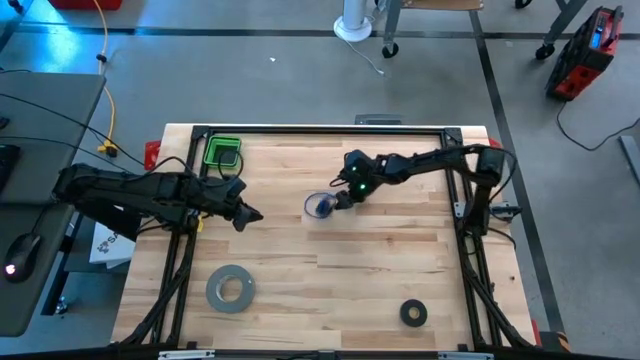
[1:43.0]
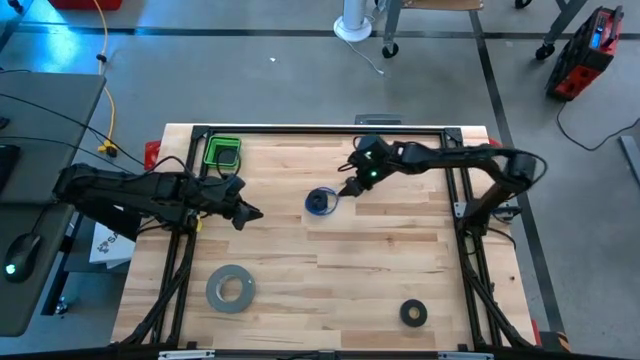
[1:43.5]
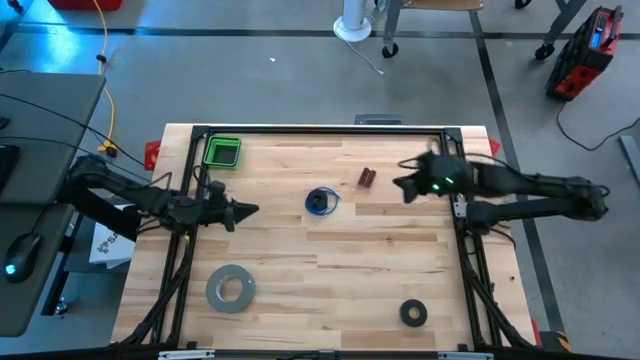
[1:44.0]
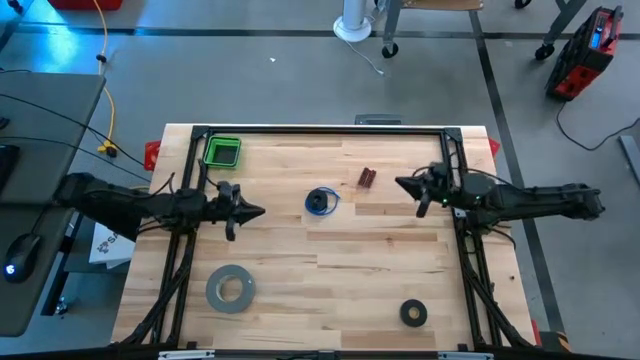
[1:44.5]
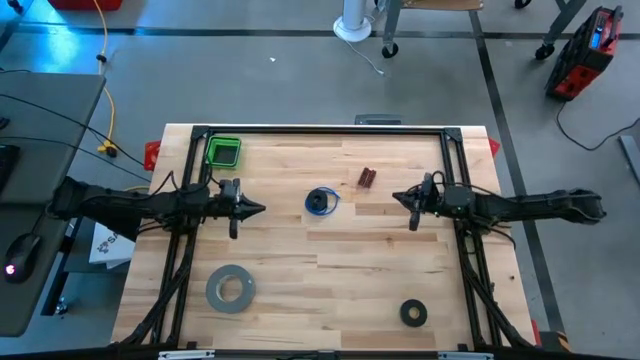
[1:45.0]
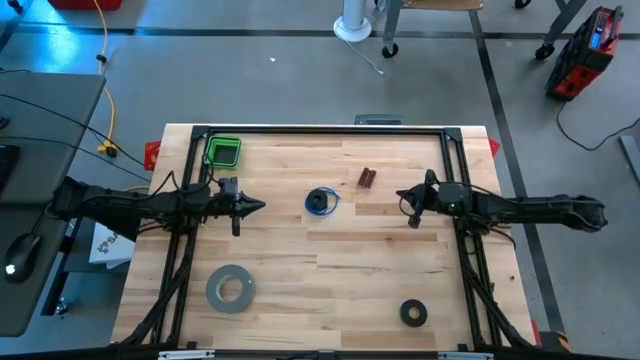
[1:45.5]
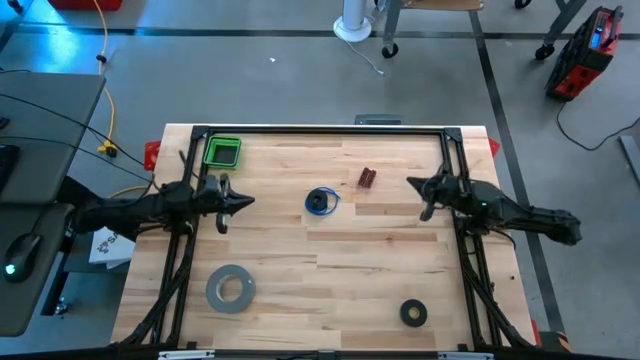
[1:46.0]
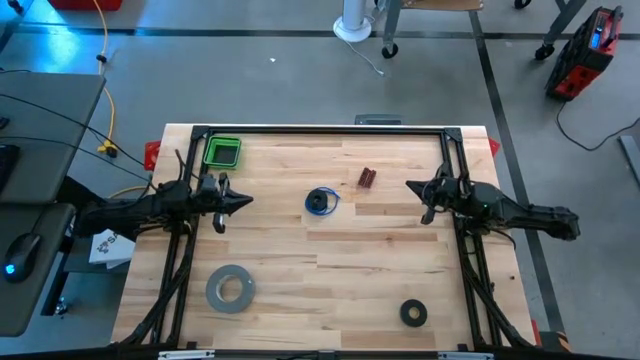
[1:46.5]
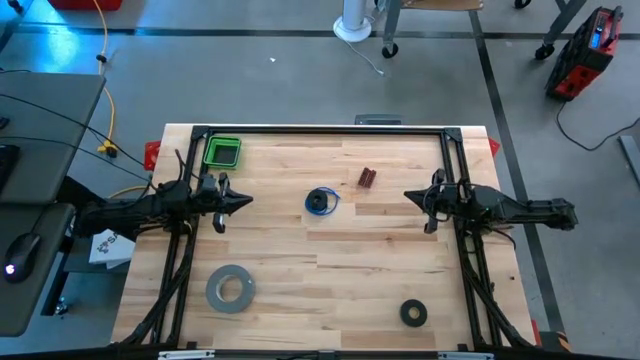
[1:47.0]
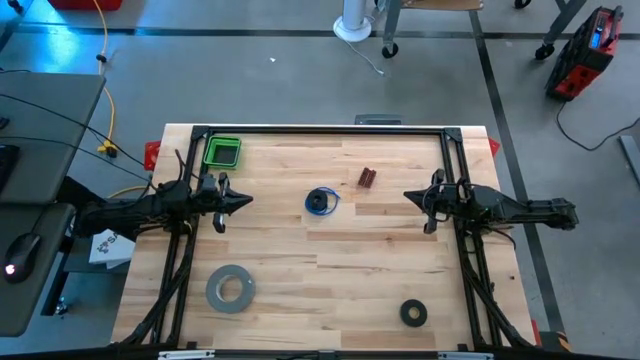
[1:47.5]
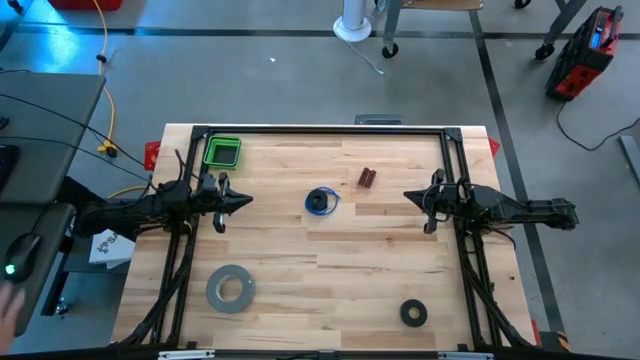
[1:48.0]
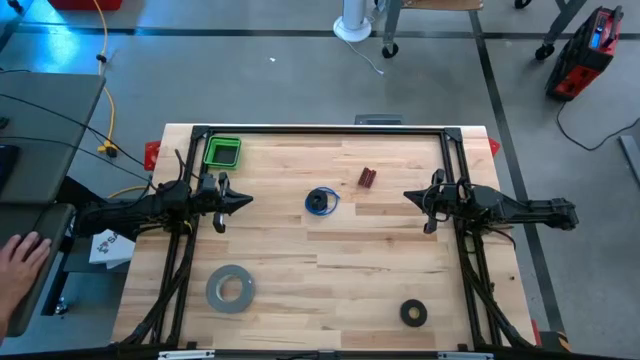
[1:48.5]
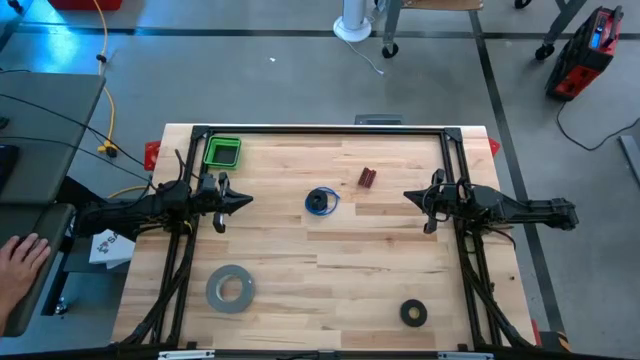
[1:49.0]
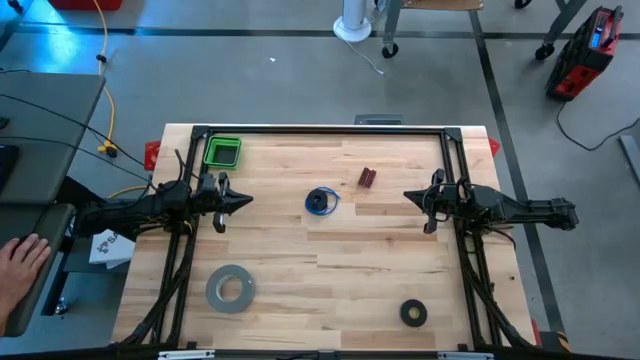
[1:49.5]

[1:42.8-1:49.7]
Task: Coil cords
Return to Home Position

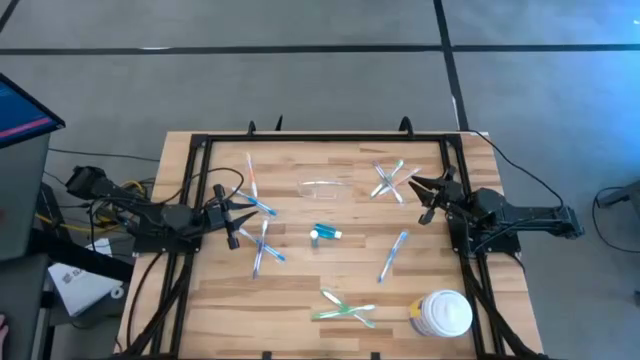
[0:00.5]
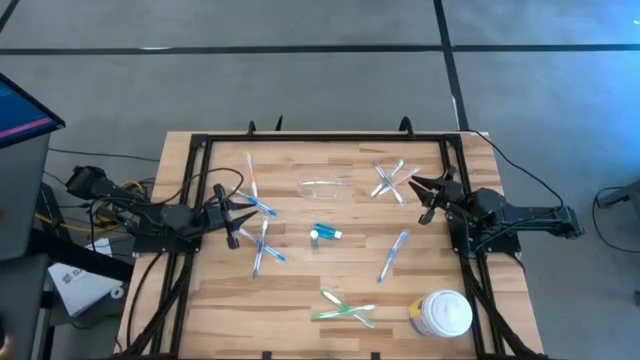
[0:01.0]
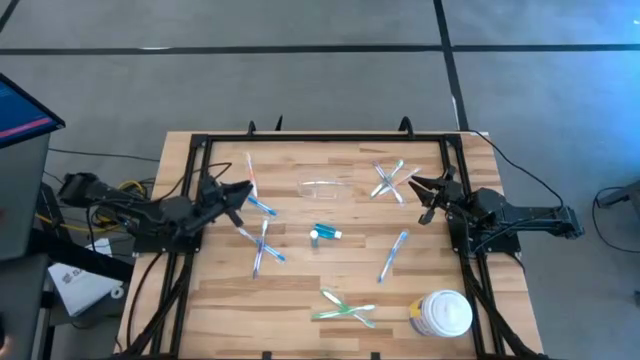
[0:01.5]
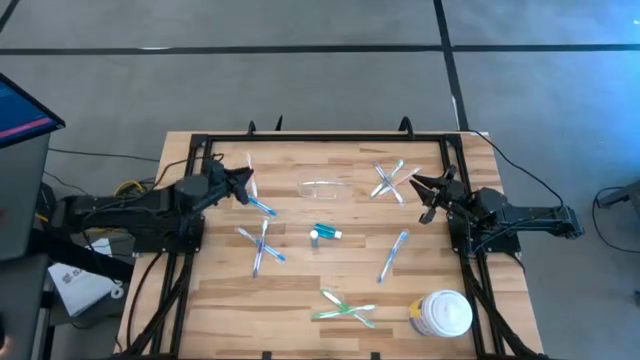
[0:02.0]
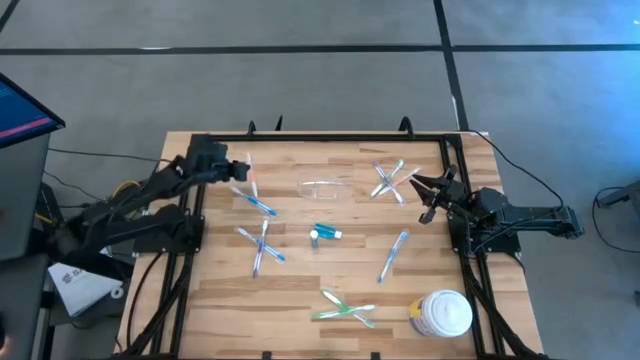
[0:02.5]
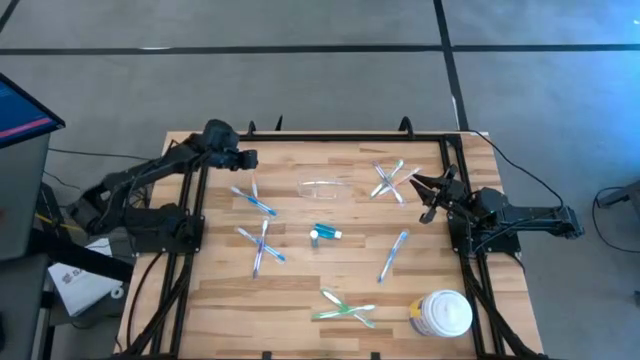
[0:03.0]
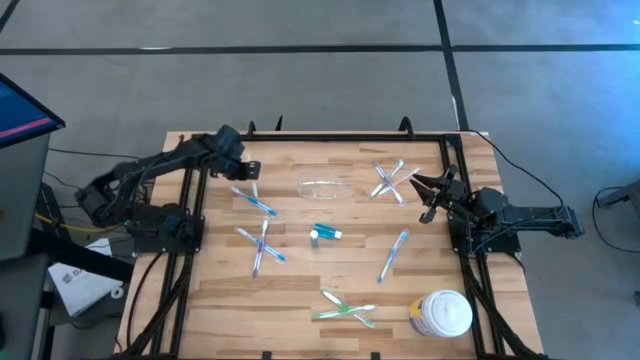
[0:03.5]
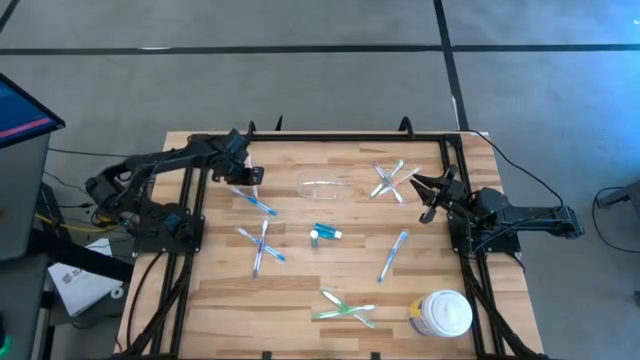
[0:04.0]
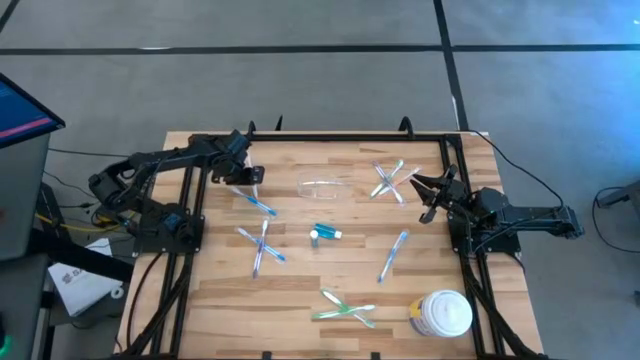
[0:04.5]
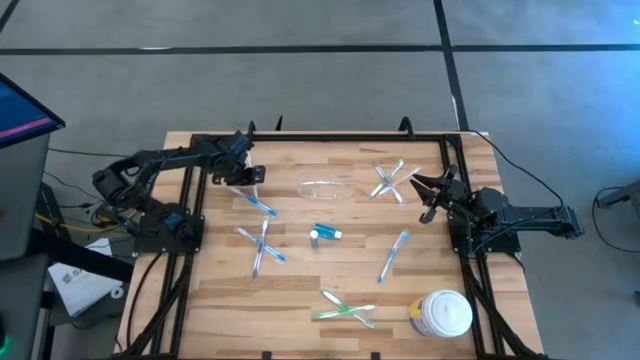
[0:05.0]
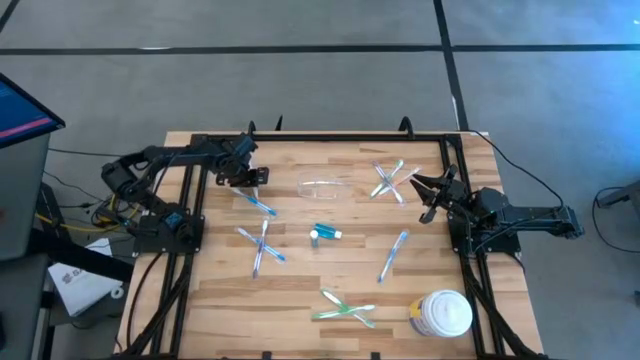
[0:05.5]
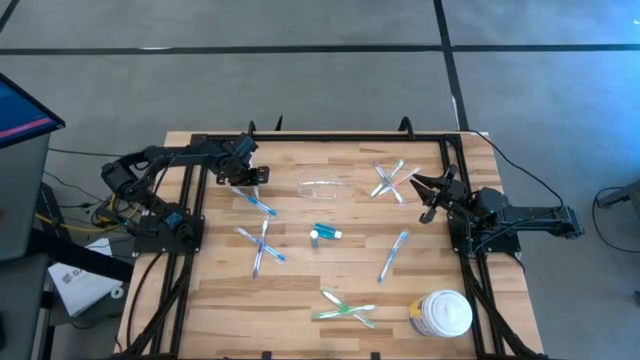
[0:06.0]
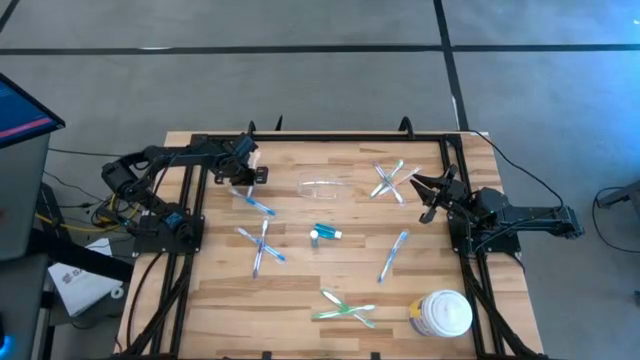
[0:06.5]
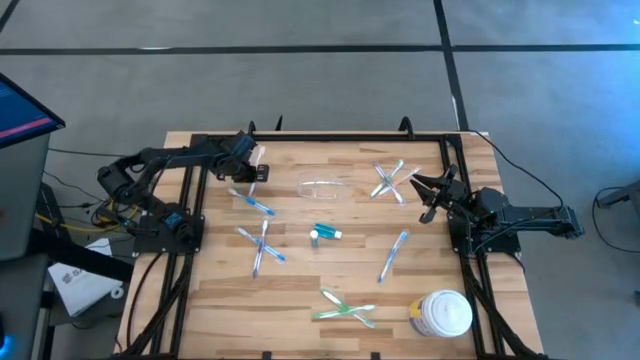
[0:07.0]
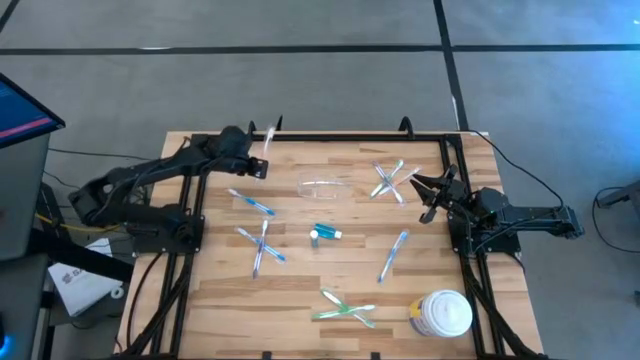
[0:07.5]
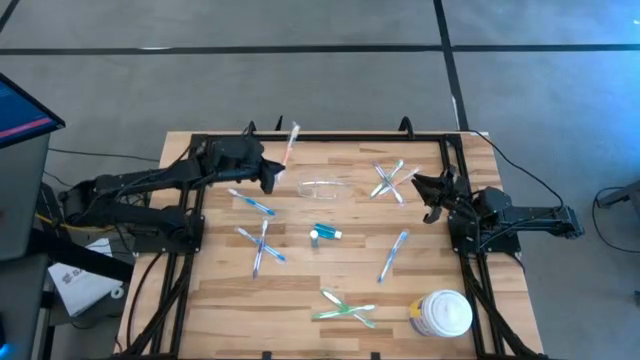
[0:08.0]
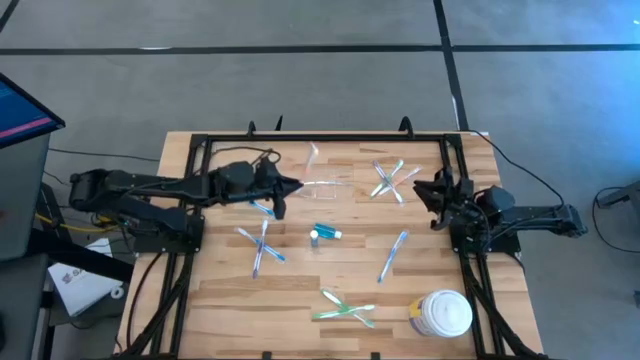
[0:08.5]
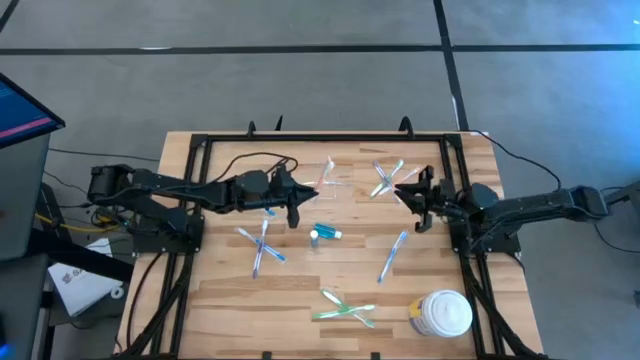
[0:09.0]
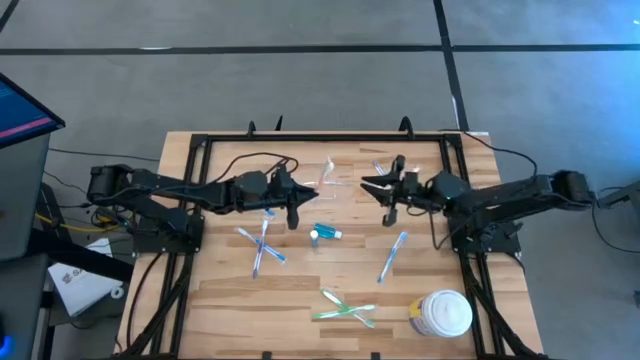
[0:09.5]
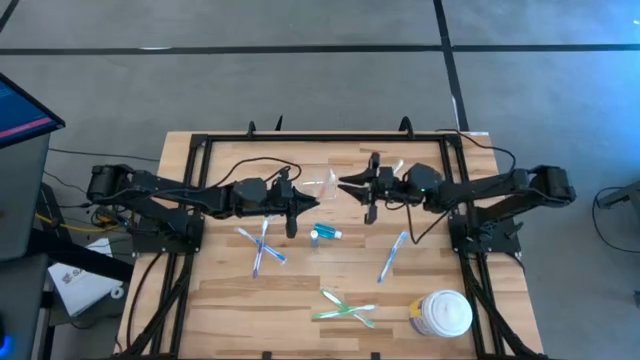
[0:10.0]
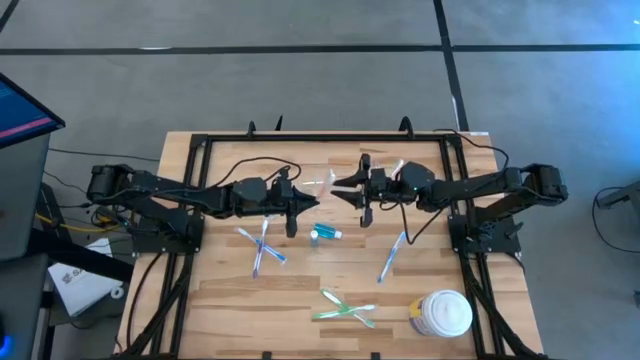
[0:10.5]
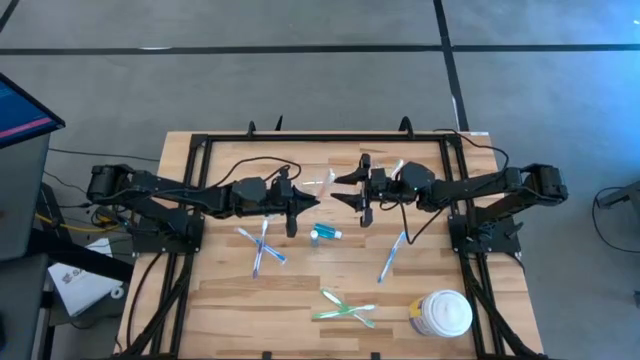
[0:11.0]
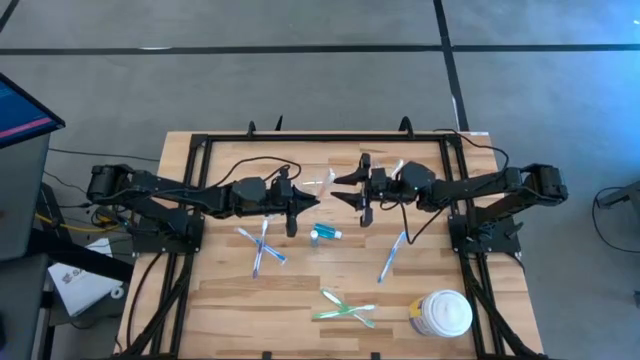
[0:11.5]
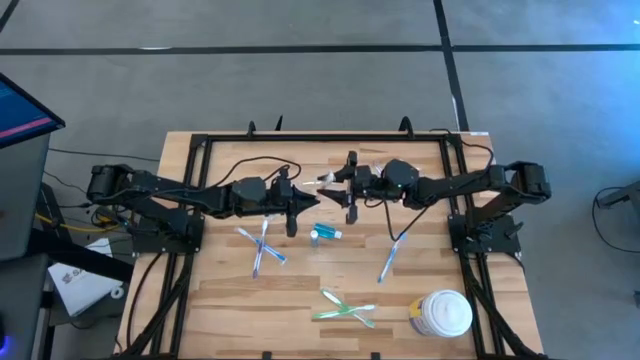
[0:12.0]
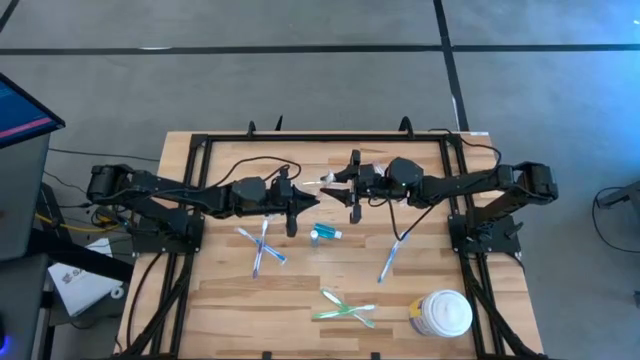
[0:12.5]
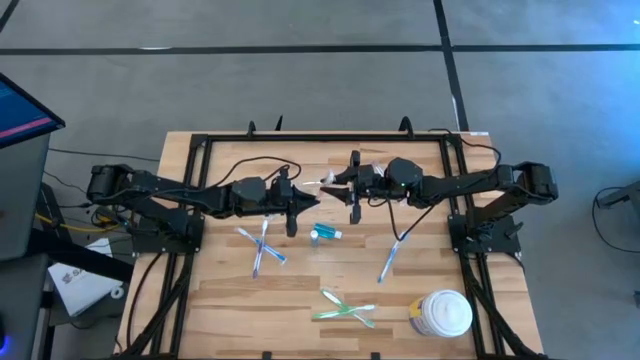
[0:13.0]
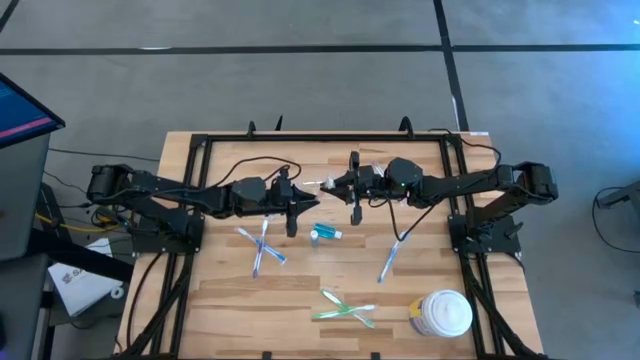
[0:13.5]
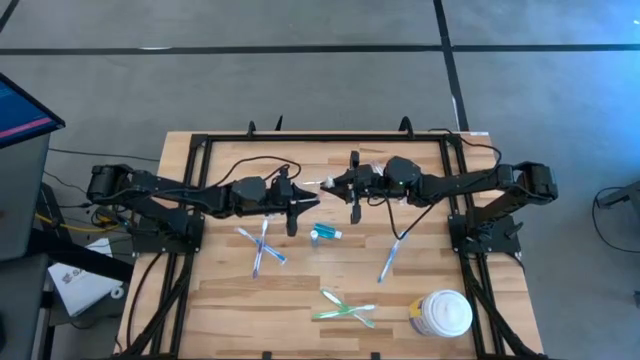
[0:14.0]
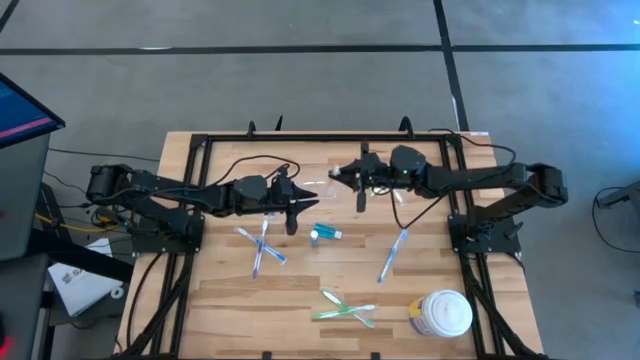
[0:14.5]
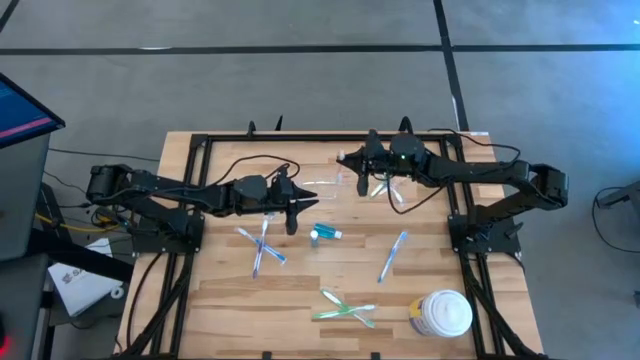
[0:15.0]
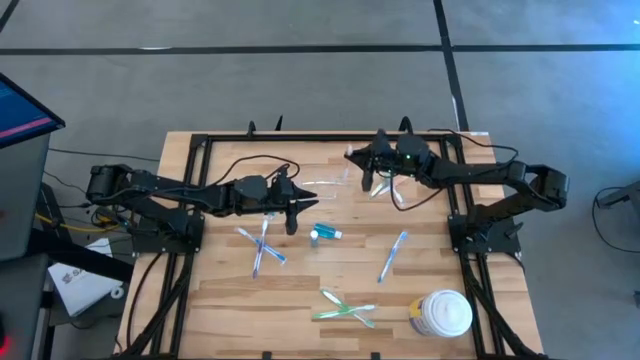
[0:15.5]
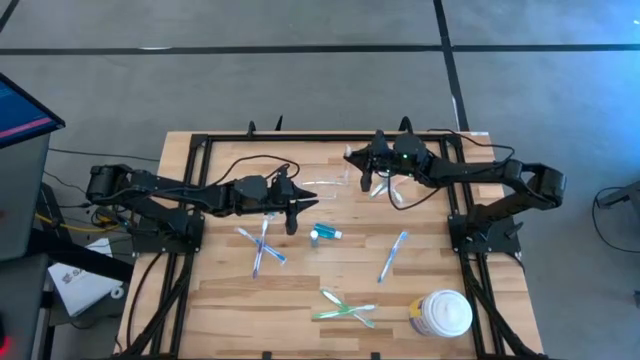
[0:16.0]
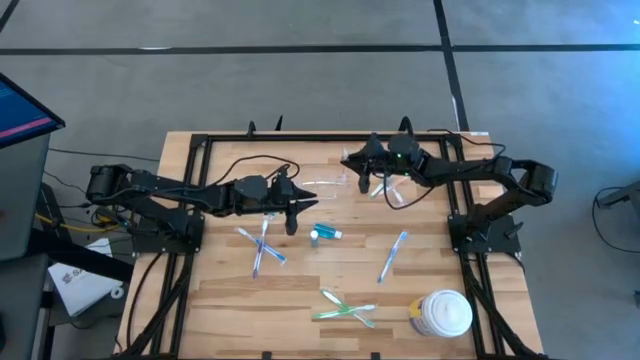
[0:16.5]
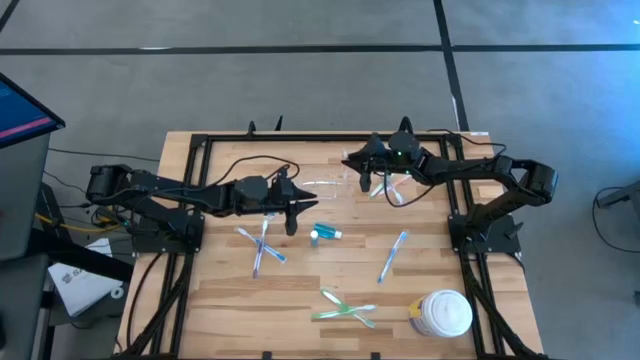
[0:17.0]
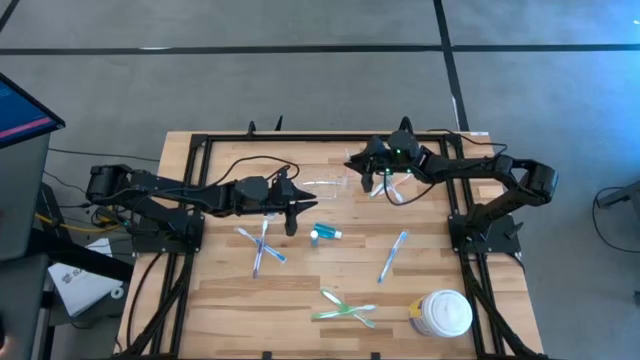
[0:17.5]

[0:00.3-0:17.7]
Task: Pick & Place toothbrushing station
Put the left orange toothbrush into the transparent organizer
